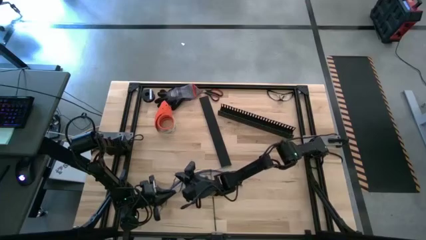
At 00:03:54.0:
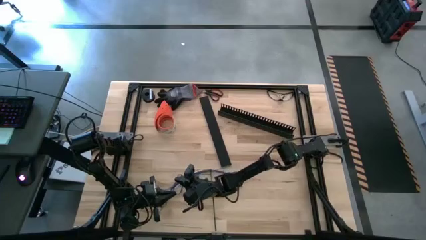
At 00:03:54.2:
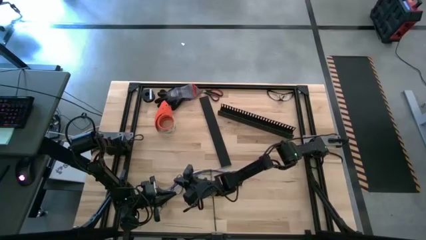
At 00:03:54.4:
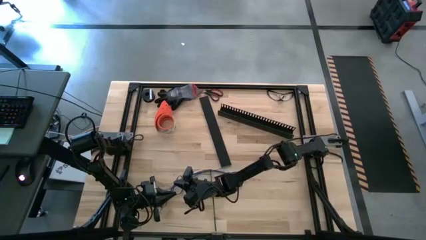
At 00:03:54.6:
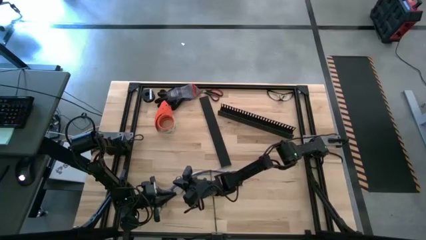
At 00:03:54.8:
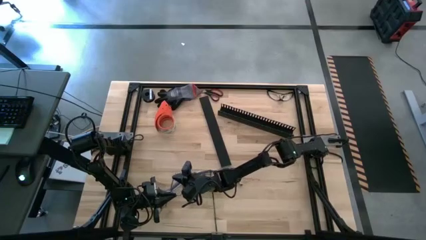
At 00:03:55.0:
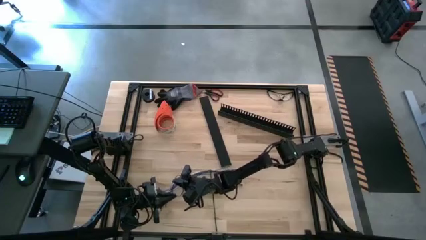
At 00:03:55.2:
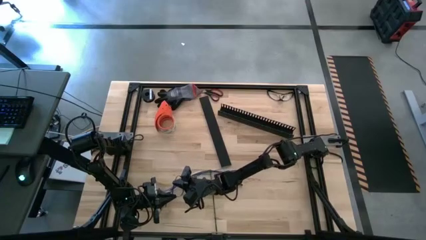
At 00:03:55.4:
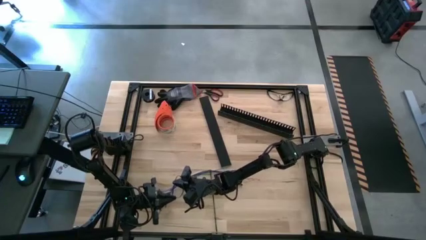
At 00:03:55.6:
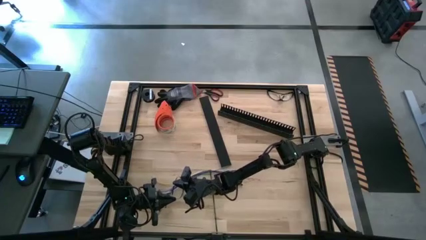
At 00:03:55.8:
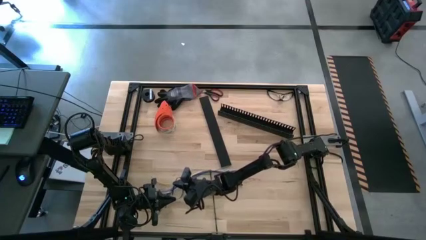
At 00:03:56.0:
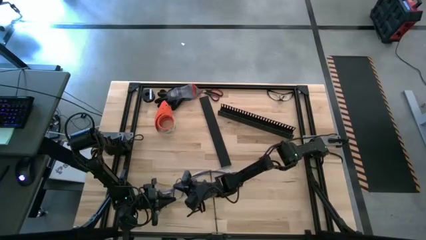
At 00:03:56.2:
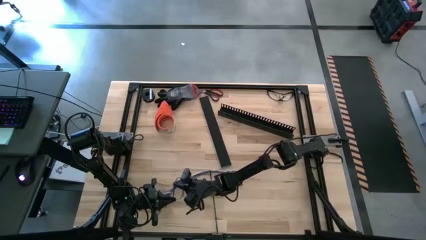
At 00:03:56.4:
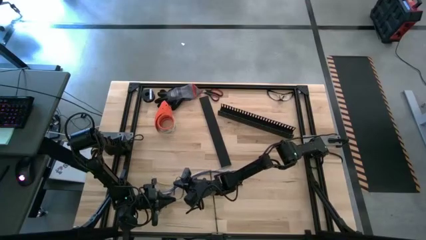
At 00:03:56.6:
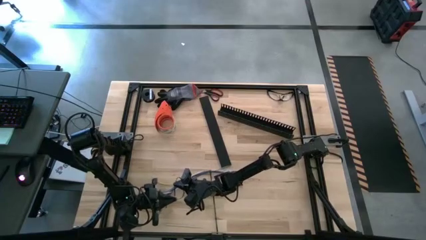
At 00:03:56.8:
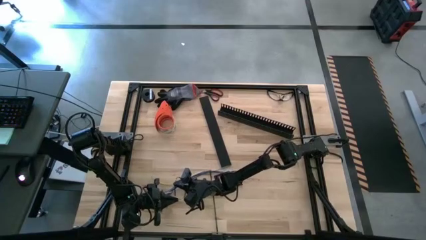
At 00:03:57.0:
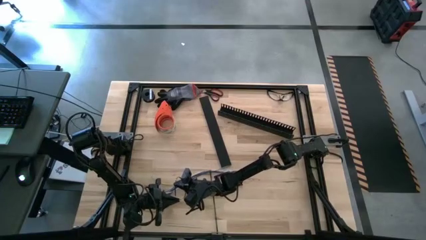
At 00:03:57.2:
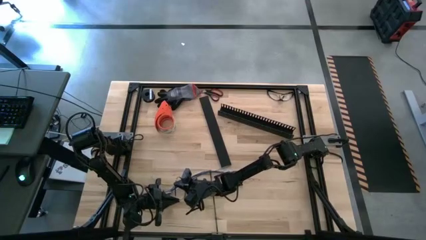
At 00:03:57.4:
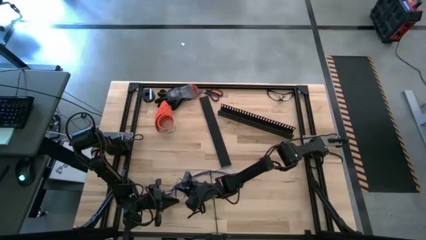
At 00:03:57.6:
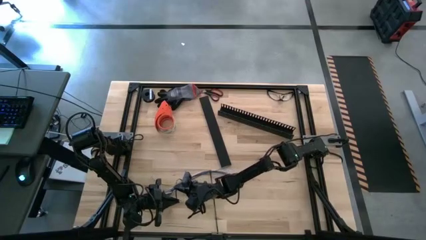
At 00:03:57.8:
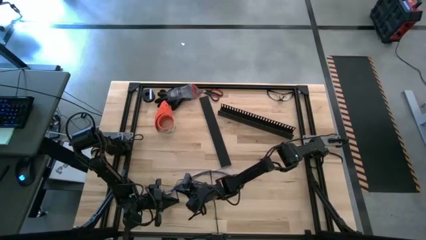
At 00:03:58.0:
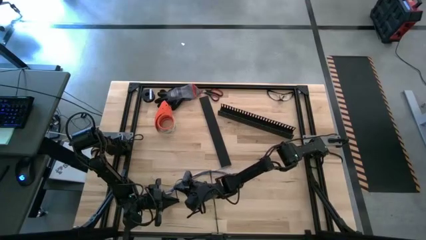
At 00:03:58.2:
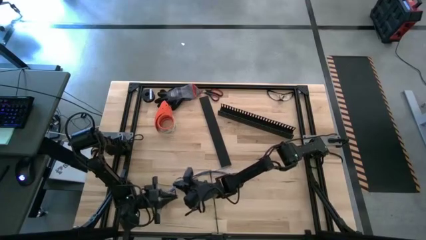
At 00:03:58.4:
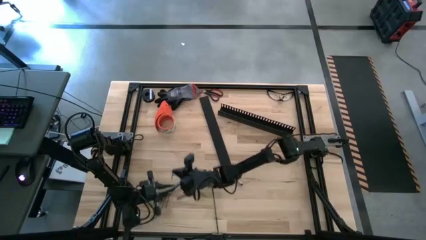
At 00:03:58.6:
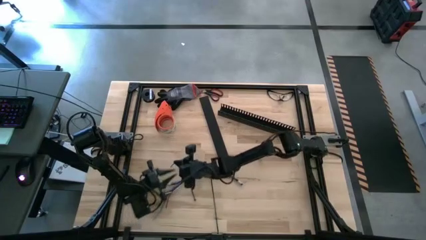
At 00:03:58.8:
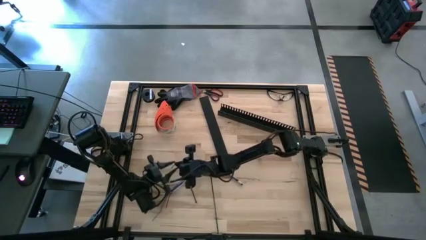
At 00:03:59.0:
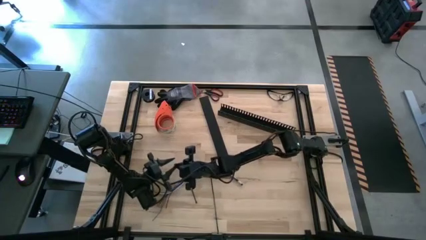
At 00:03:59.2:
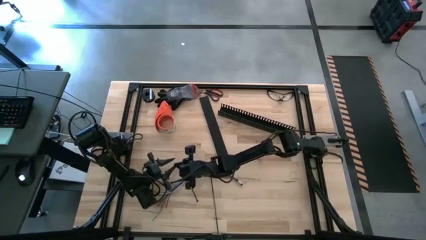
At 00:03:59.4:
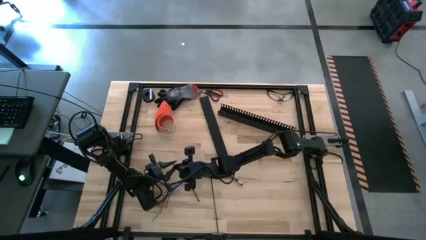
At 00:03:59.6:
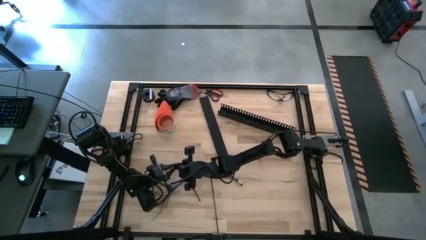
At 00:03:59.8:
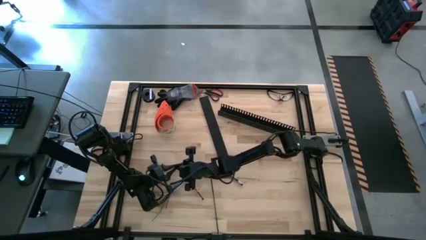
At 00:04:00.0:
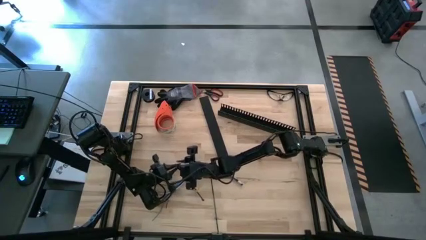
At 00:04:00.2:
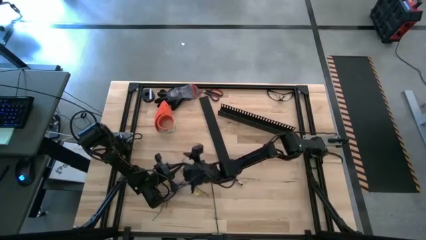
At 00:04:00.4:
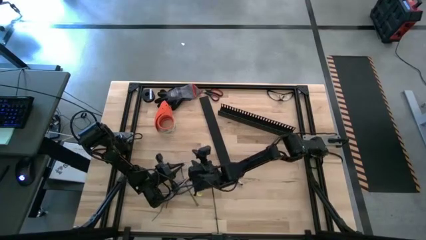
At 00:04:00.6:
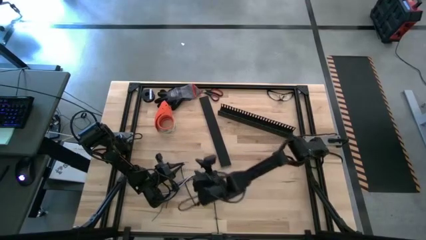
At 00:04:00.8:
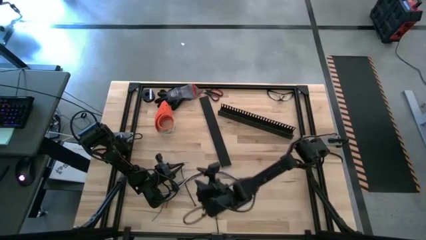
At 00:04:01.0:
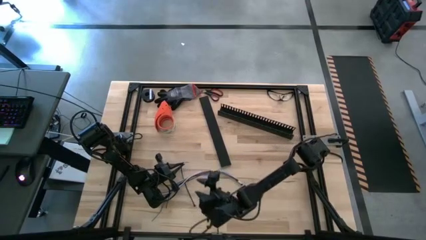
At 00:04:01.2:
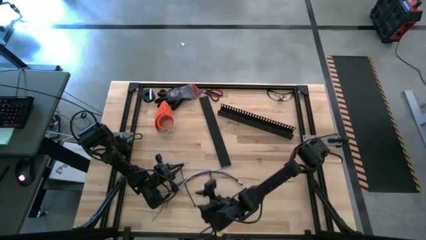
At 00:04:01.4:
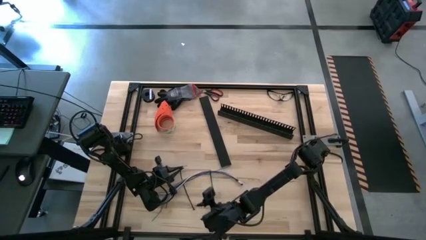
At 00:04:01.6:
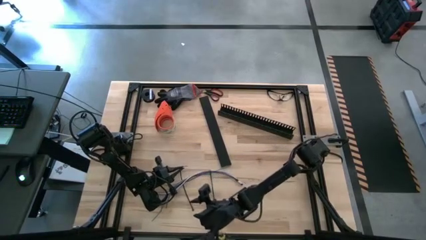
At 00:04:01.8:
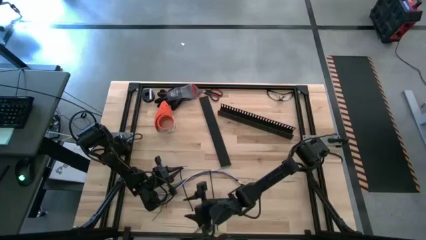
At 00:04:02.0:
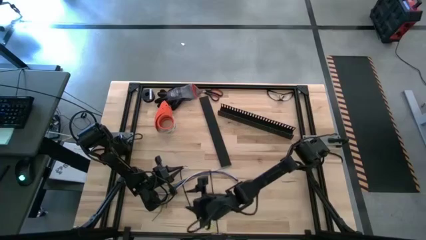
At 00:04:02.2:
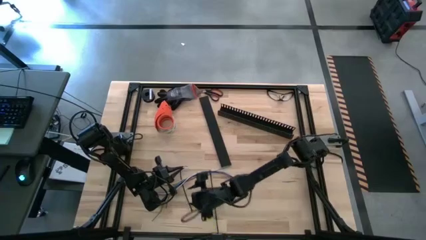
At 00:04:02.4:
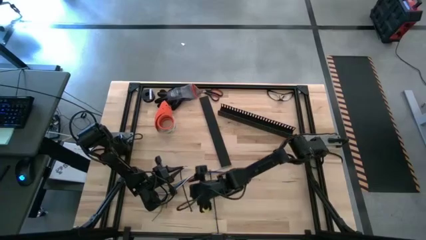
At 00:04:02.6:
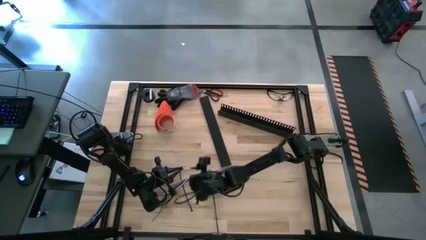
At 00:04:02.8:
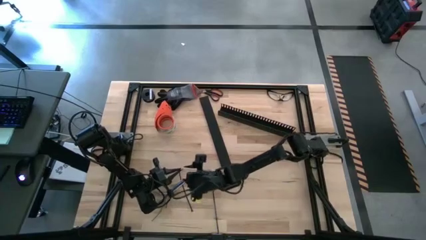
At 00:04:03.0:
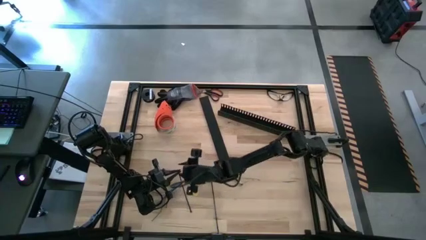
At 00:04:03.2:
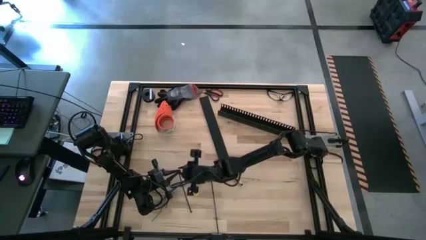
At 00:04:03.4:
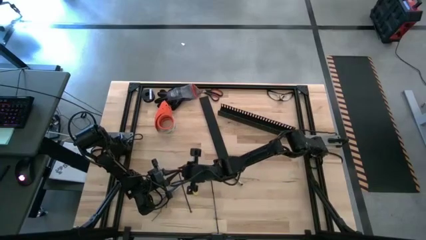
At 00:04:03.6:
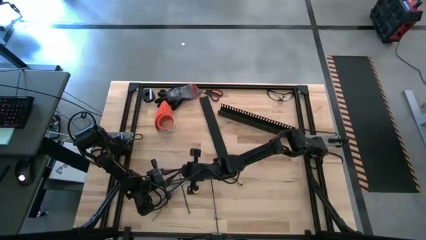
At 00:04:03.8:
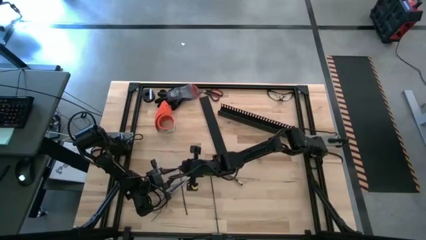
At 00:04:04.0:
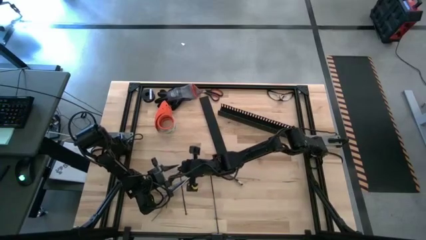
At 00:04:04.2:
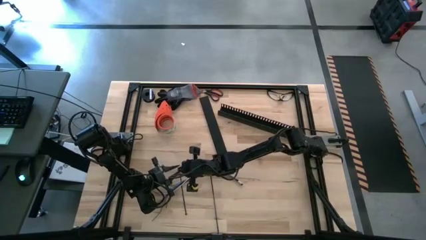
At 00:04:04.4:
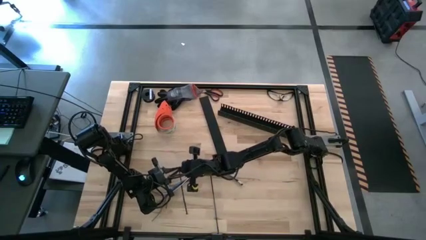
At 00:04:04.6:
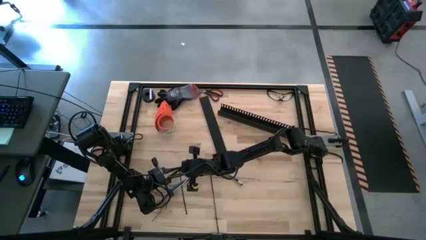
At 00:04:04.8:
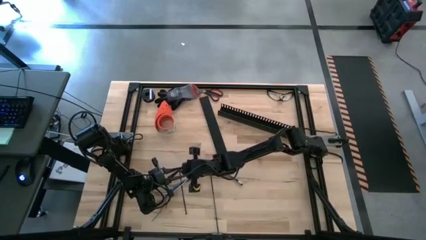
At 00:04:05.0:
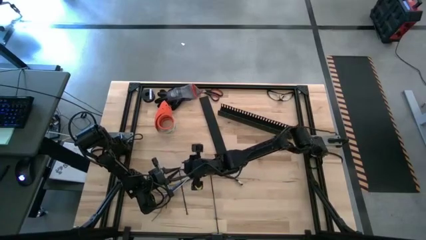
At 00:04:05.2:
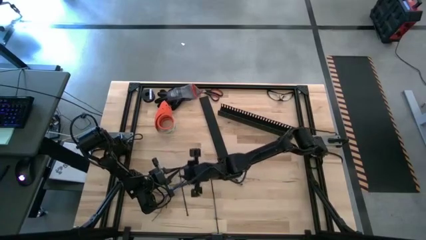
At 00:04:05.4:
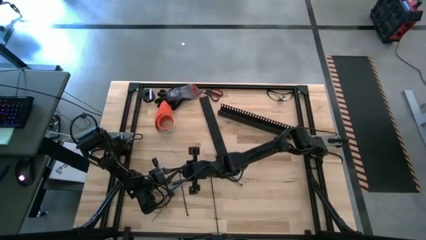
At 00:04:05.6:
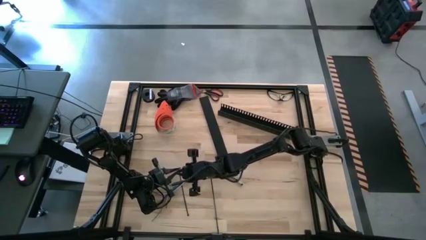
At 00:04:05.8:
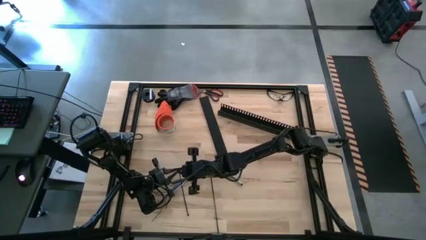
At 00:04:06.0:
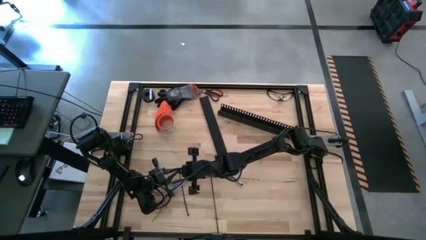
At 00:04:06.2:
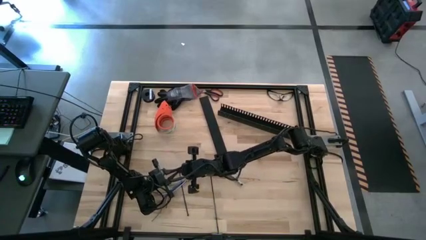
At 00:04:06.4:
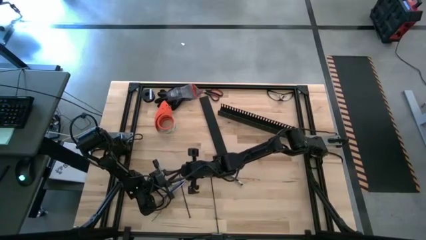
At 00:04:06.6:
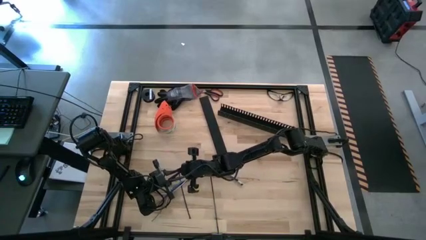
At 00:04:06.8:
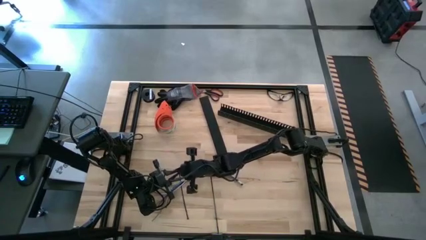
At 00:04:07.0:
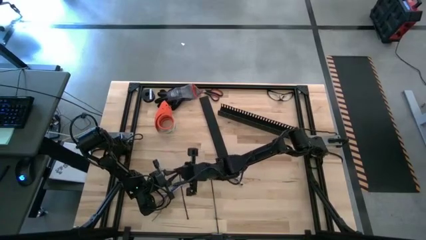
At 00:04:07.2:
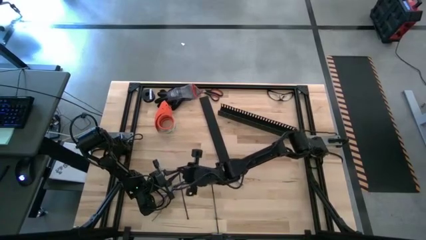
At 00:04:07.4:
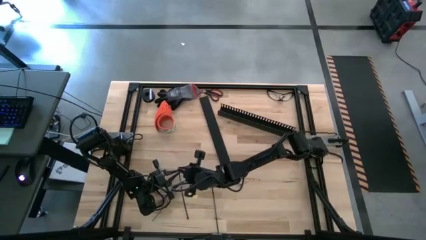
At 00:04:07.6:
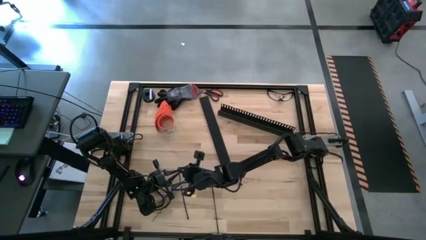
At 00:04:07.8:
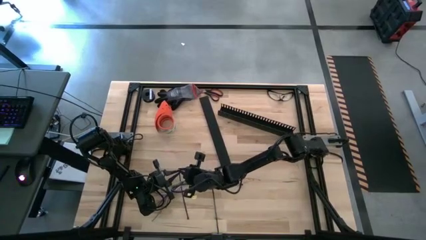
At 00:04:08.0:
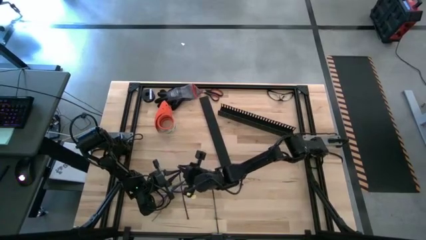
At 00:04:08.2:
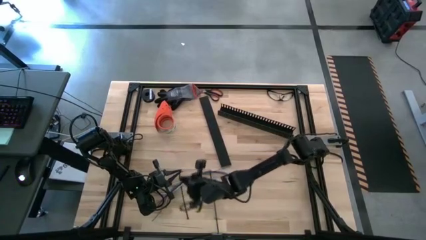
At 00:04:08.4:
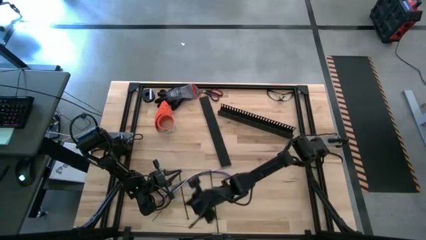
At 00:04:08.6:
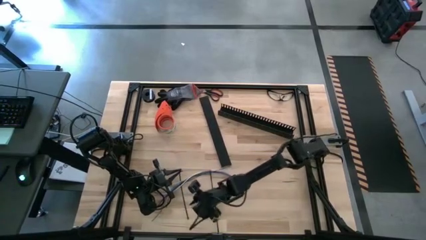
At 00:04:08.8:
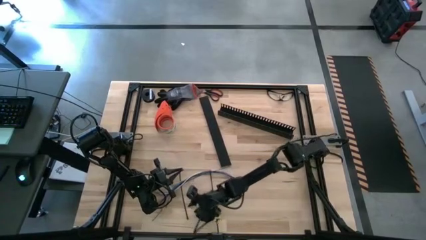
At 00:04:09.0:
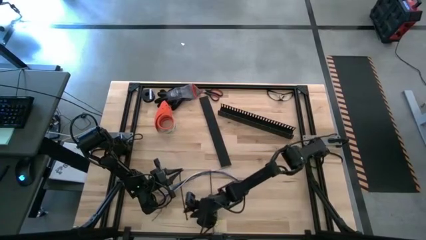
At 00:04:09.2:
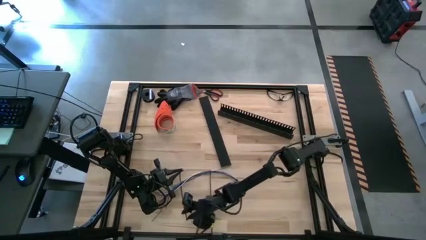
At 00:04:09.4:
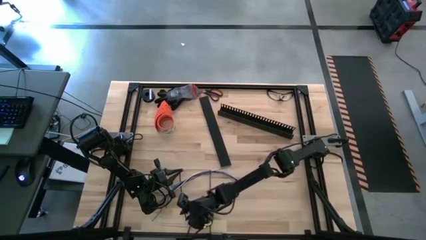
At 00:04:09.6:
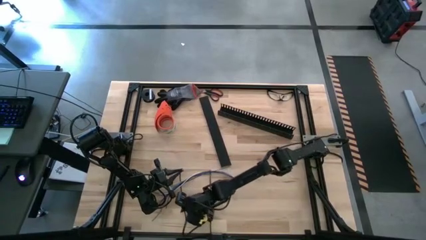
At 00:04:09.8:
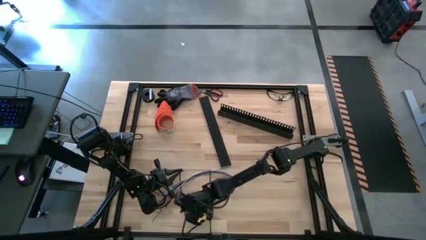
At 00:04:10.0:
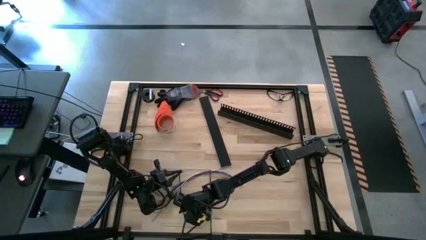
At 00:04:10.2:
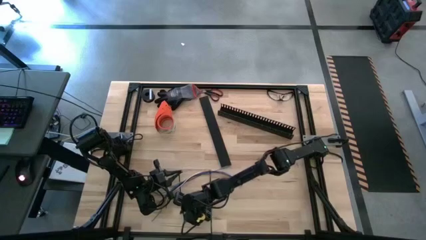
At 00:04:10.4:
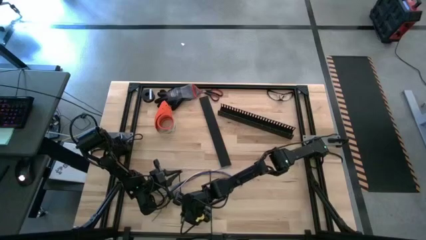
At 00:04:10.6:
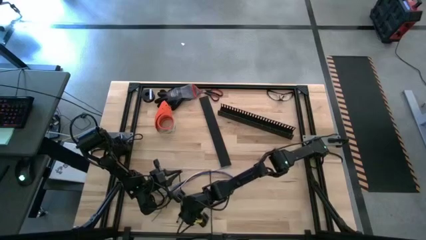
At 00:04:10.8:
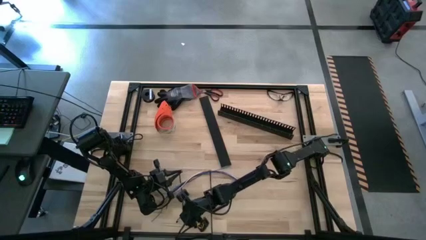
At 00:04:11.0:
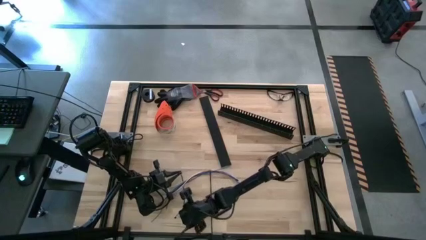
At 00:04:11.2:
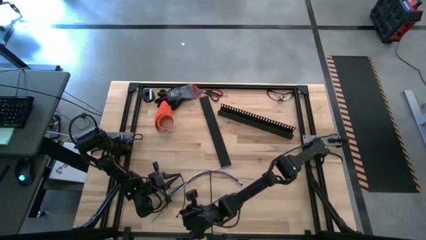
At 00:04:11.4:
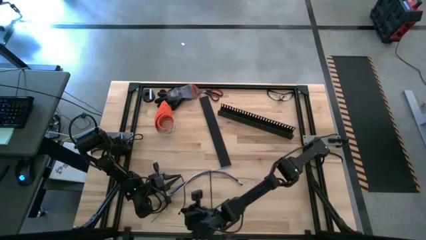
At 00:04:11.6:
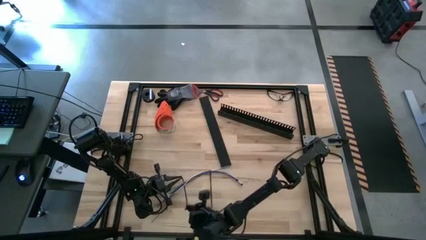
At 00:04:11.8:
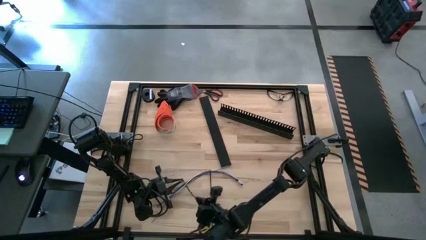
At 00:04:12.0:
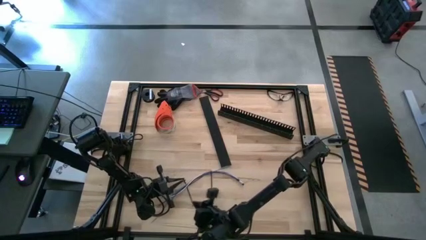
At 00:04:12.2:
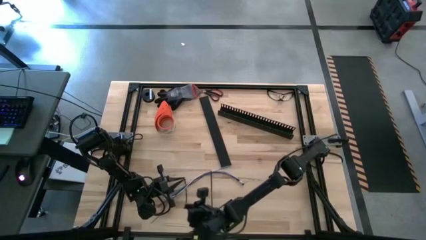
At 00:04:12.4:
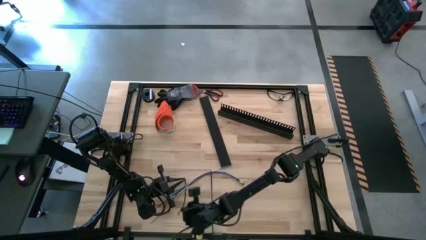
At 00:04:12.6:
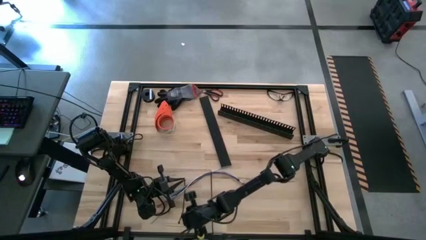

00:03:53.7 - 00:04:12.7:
Task: Ziptie cables
Wrap the black zip tie on the cables
